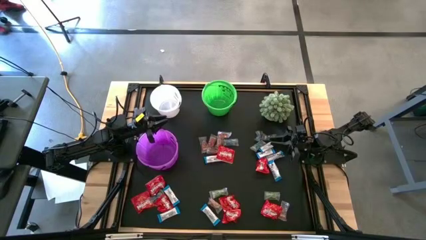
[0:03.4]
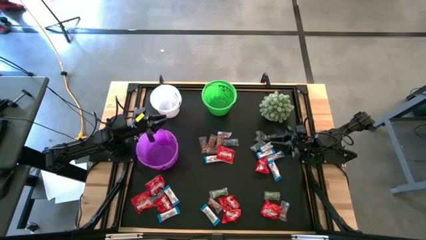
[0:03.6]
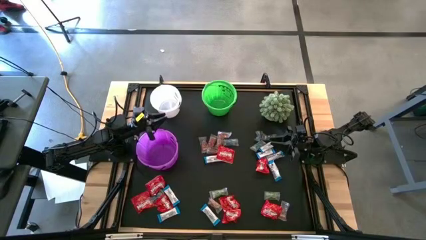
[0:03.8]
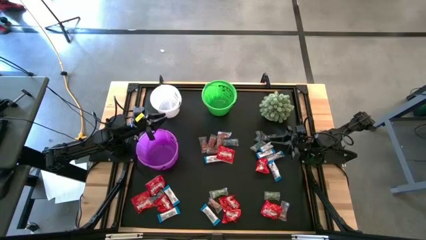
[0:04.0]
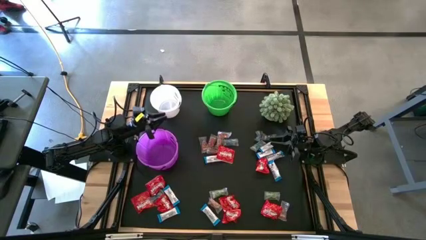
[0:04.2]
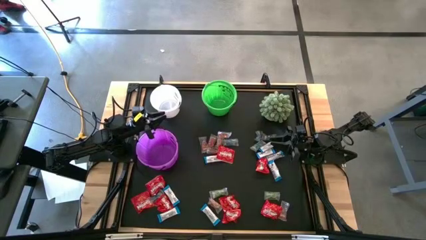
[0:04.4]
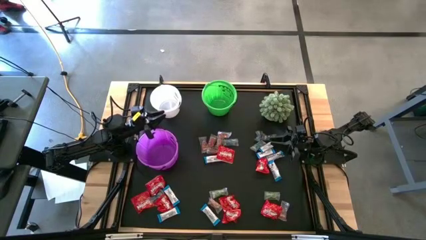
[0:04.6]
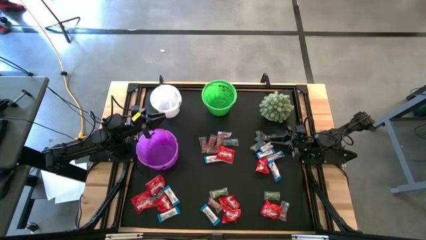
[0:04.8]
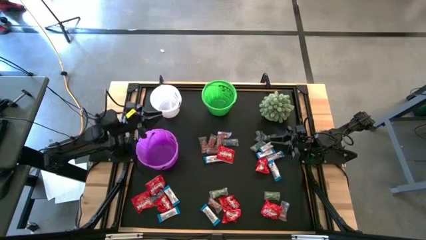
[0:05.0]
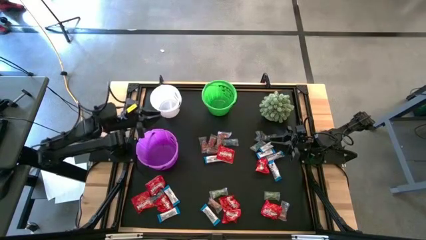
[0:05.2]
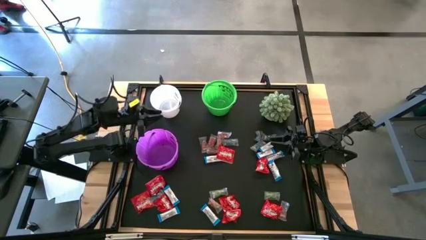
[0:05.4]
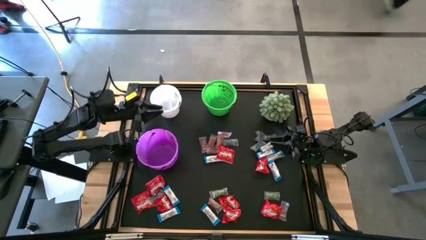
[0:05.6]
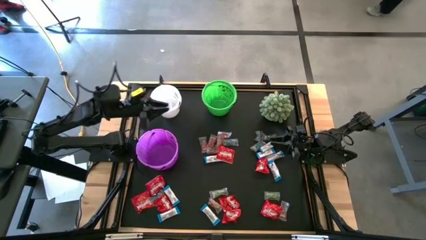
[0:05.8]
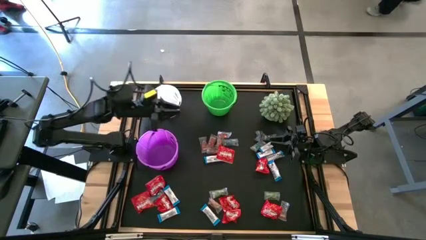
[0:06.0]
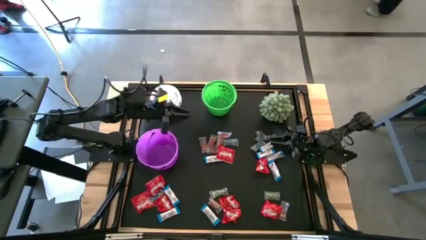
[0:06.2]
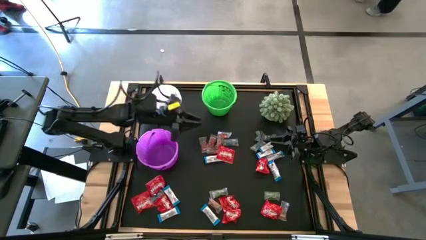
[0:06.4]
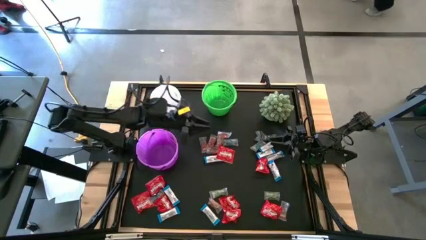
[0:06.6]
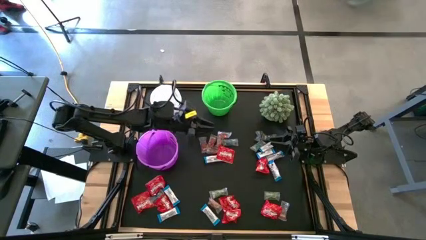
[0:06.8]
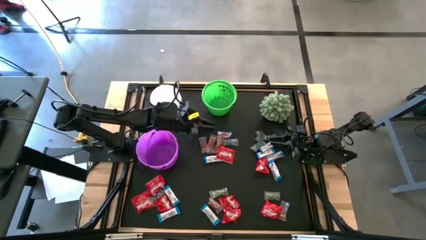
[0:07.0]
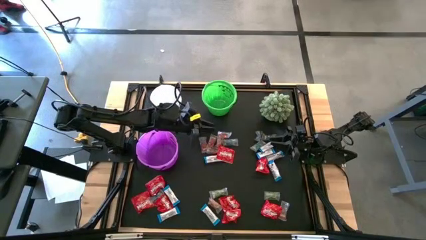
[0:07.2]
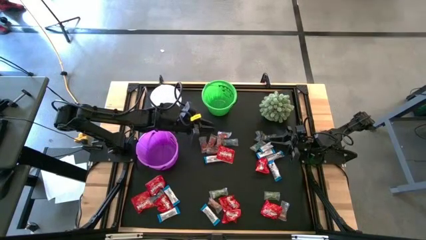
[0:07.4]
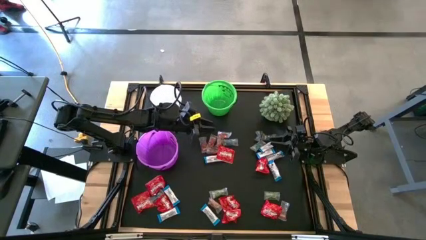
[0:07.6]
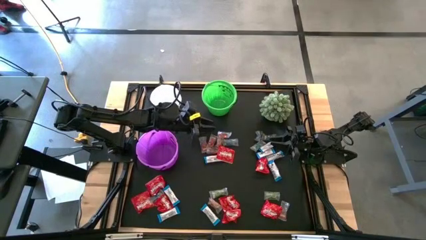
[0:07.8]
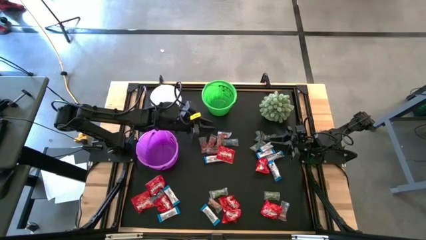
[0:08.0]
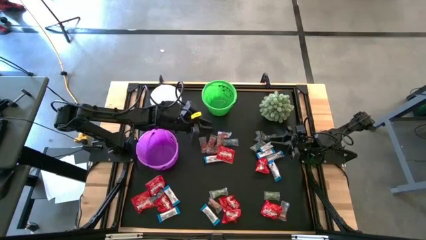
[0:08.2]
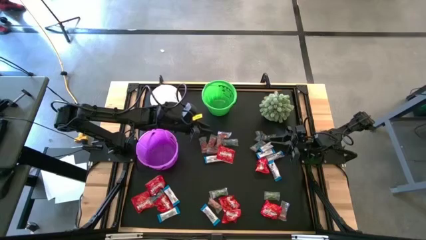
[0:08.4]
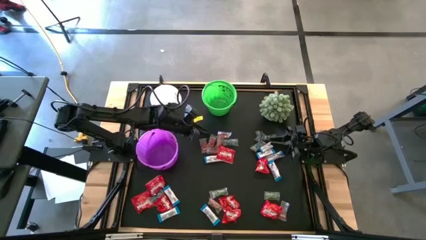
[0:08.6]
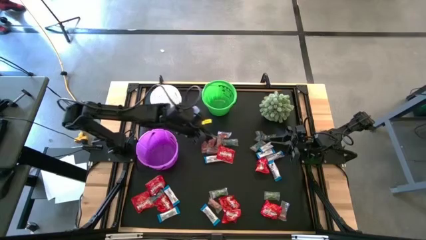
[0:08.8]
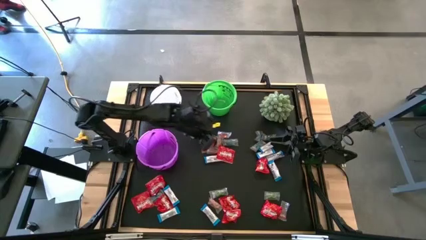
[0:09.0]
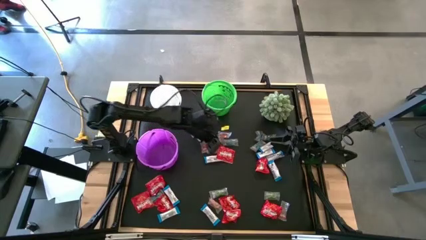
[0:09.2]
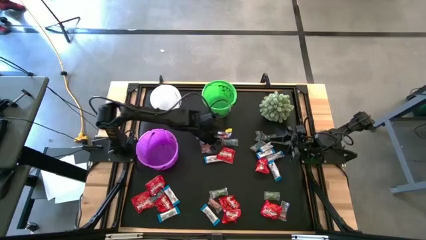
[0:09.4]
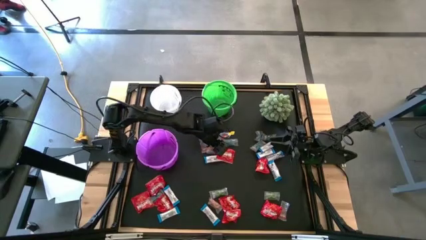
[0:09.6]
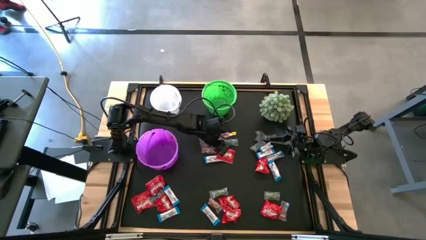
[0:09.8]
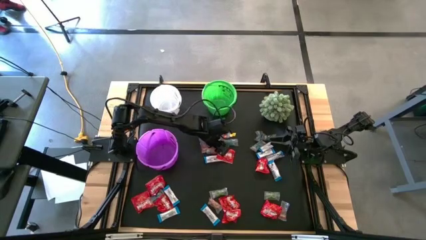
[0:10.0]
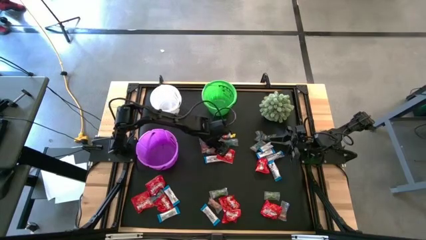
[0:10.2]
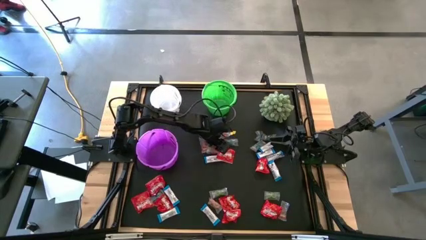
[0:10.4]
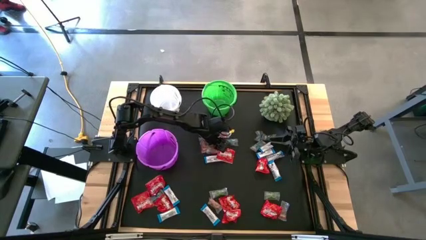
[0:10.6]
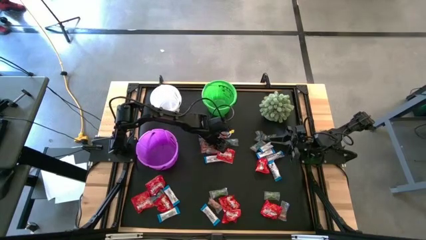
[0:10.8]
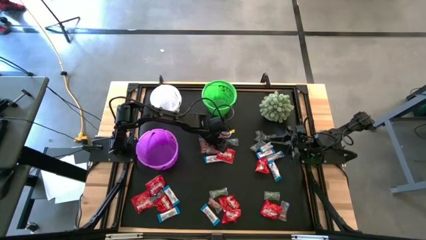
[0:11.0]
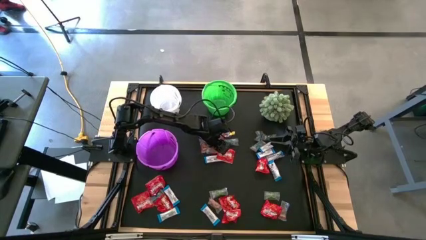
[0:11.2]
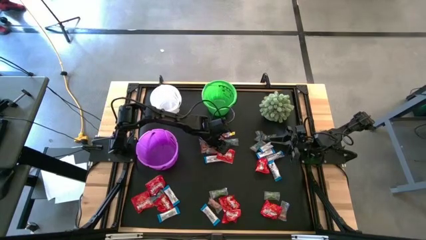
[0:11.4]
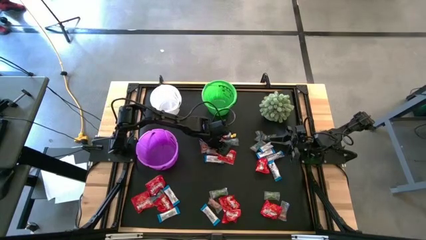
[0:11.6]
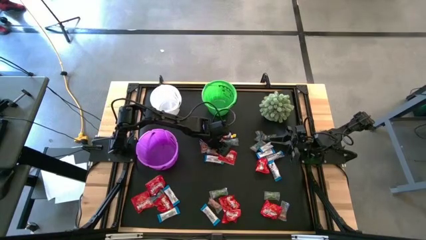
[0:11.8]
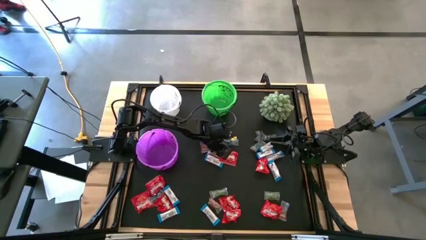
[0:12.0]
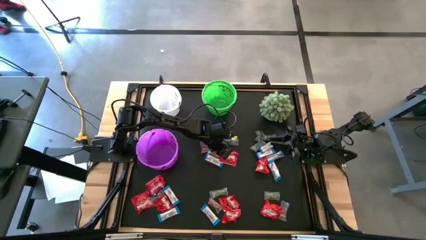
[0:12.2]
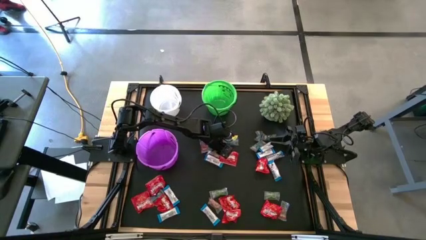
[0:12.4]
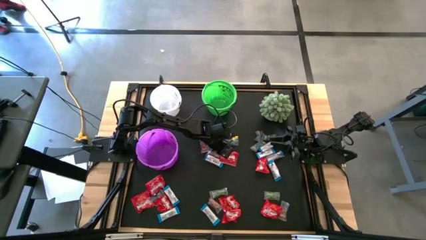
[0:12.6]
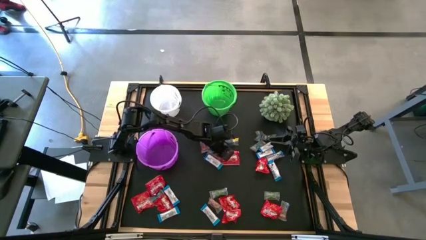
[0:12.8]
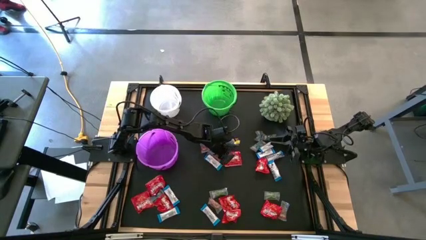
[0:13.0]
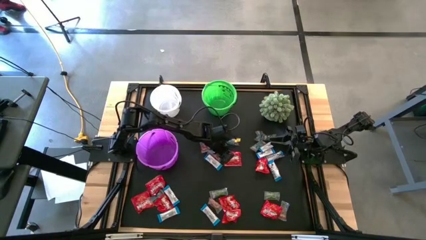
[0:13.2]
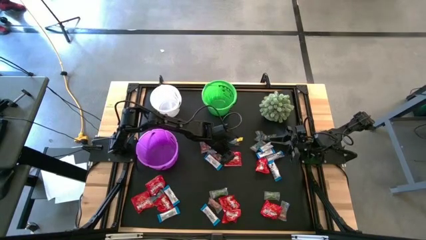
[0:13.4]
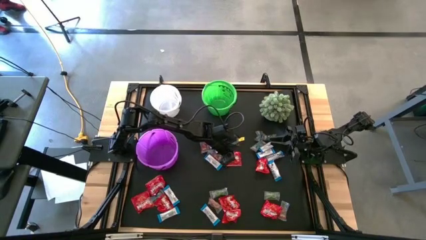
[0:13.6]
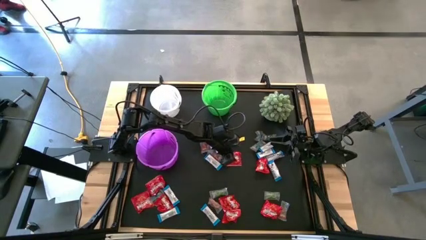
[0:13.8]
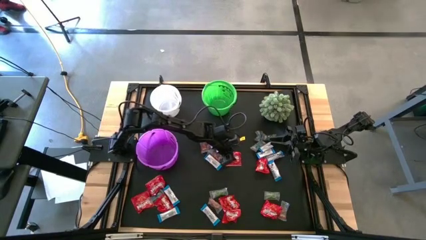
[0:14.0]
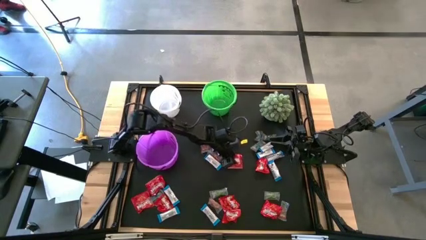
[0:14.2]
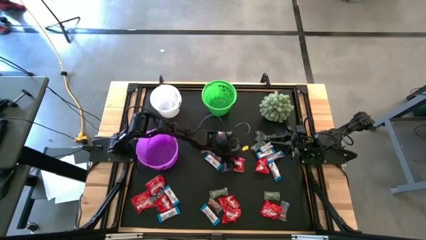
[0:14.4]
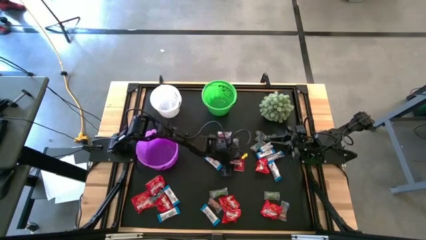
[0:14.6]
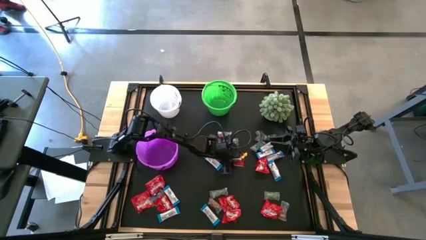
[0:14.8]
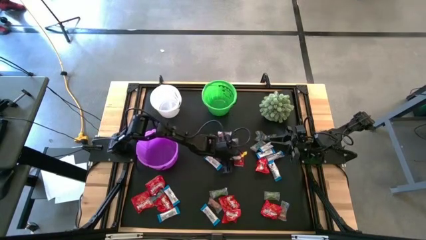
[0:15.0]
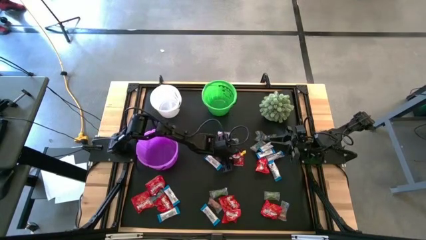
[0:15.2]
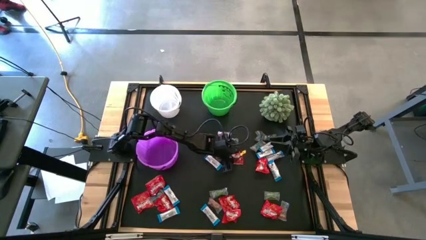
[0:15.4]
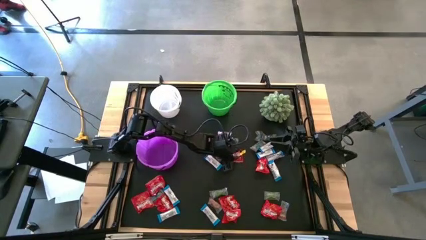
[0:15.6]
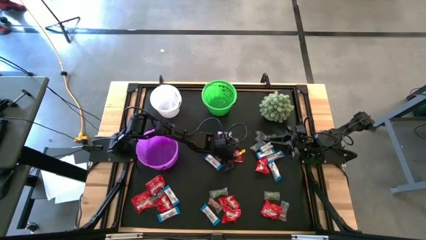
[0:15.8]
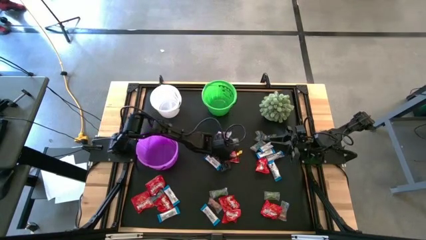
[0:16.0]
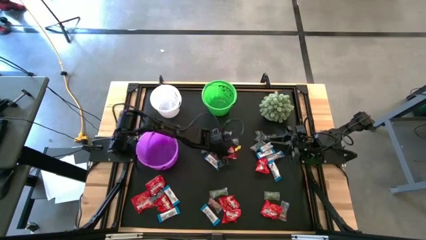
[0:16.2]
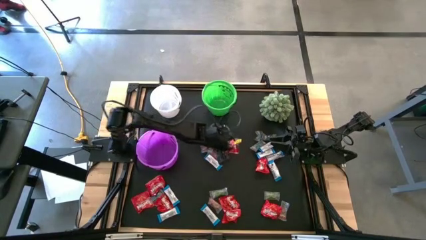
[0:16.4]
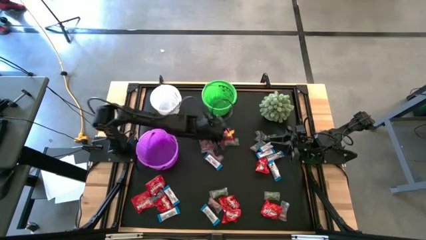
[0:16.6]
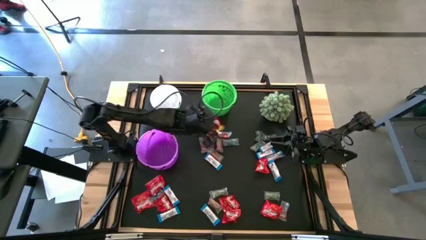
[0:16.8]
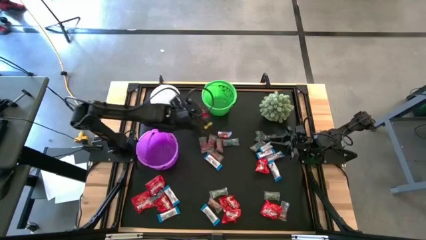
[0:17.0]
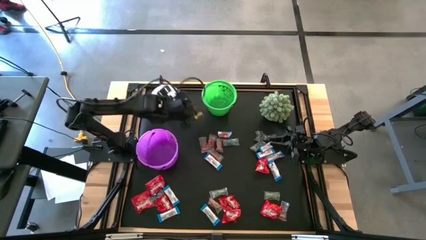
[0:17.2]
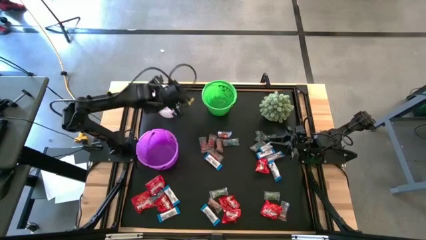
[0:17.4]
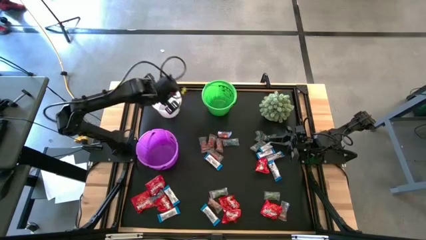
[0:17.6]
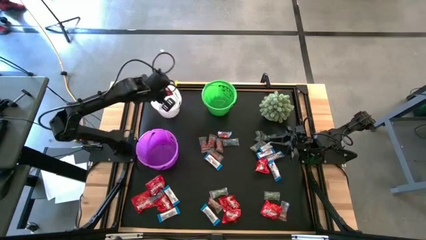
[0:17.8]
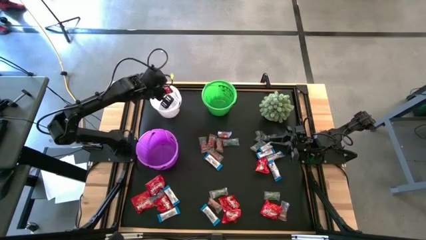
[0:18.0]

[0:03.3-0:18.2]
Task: Sort candy
Put the red candy into the white bucket
